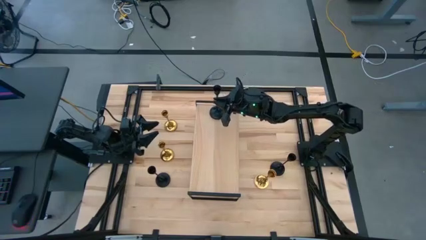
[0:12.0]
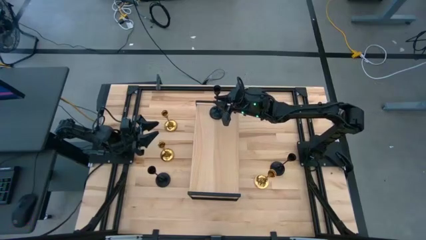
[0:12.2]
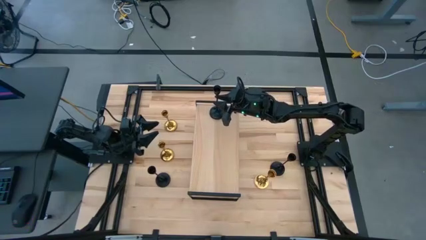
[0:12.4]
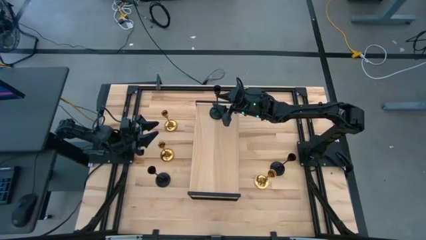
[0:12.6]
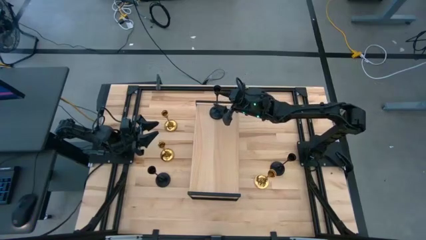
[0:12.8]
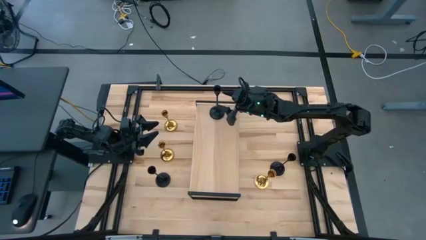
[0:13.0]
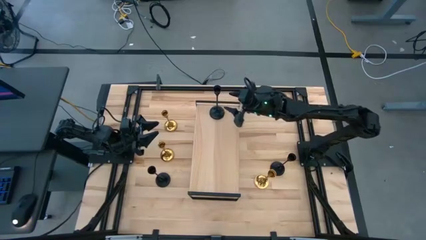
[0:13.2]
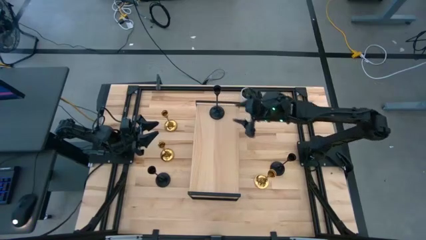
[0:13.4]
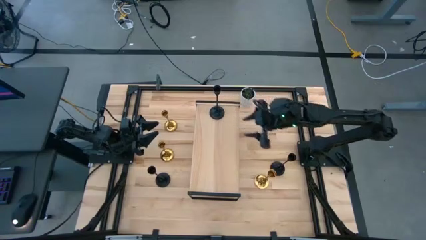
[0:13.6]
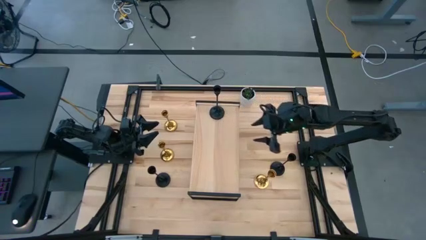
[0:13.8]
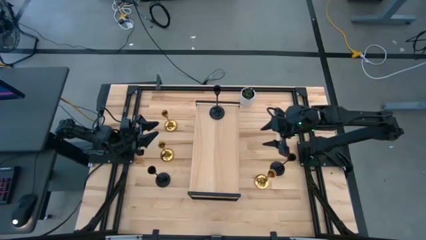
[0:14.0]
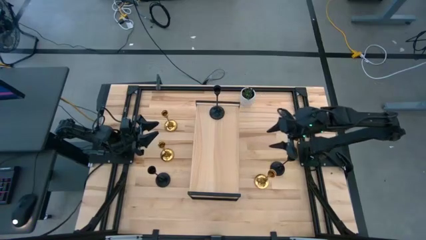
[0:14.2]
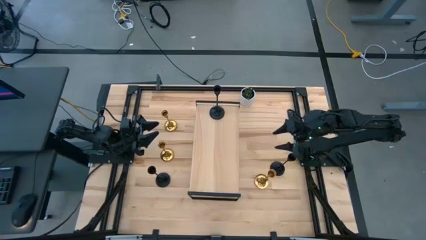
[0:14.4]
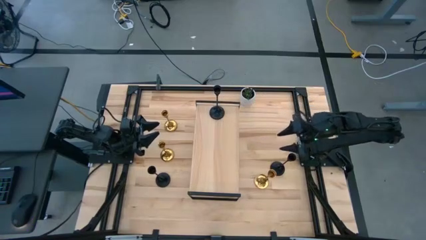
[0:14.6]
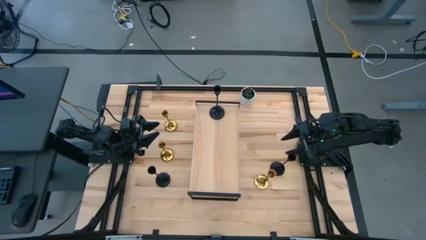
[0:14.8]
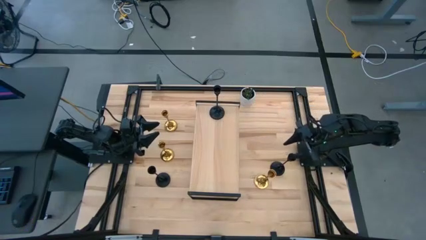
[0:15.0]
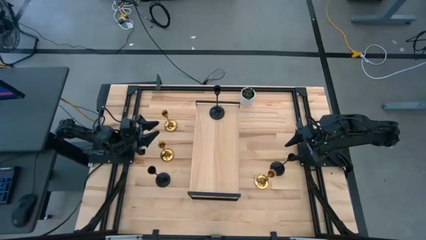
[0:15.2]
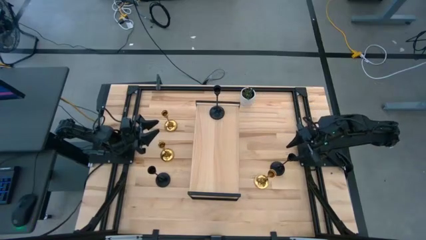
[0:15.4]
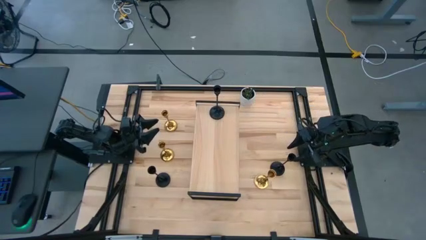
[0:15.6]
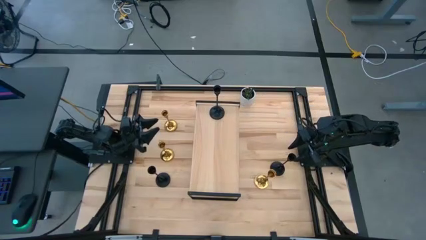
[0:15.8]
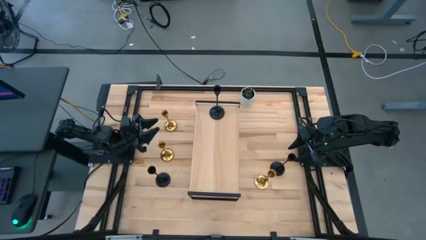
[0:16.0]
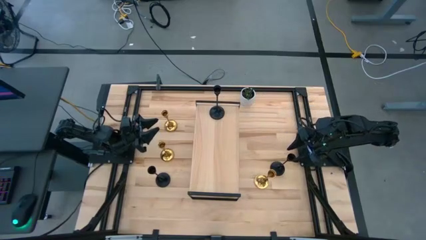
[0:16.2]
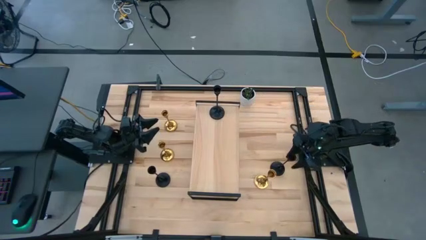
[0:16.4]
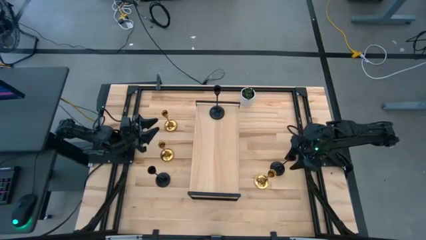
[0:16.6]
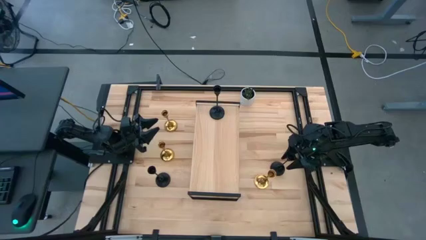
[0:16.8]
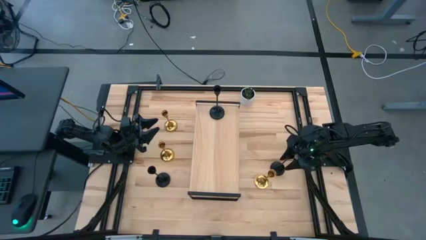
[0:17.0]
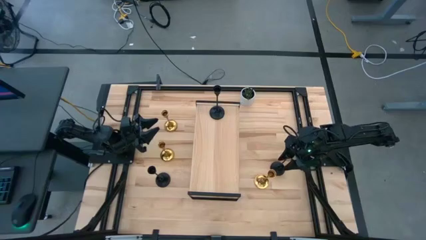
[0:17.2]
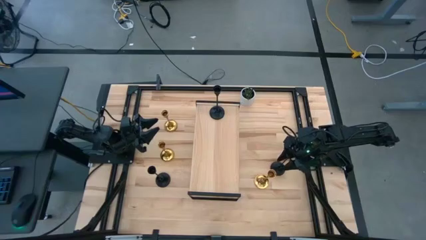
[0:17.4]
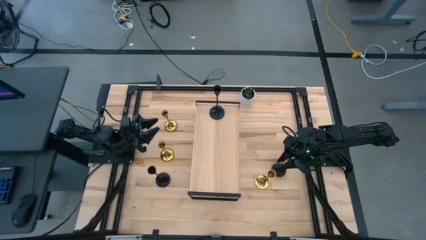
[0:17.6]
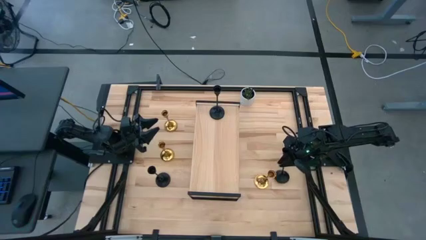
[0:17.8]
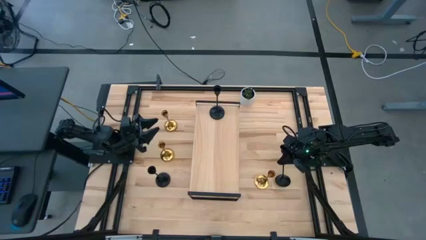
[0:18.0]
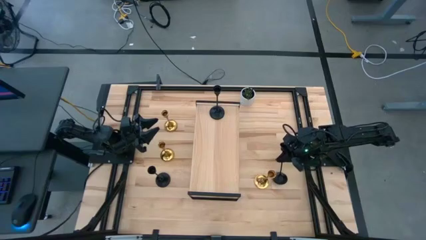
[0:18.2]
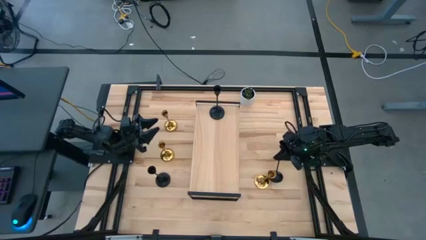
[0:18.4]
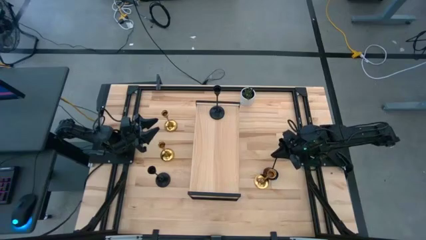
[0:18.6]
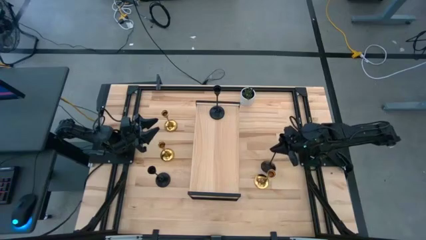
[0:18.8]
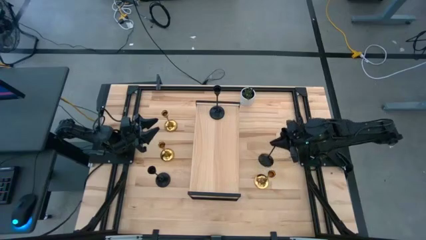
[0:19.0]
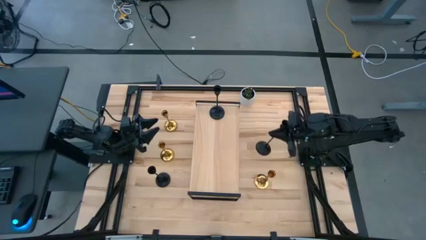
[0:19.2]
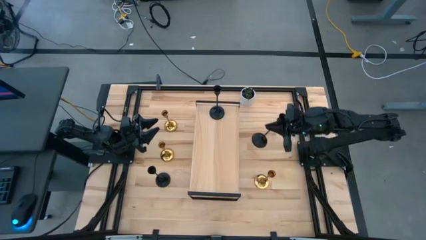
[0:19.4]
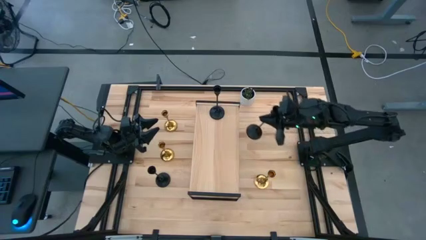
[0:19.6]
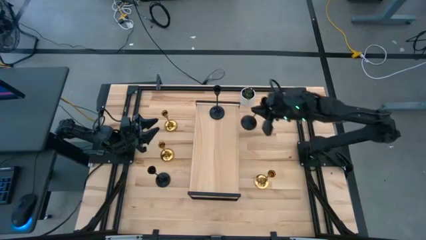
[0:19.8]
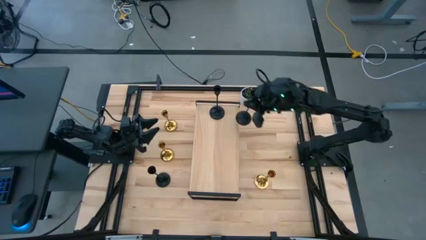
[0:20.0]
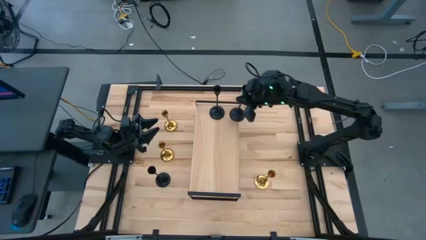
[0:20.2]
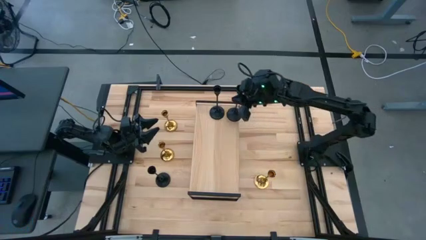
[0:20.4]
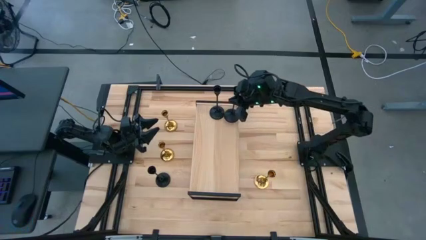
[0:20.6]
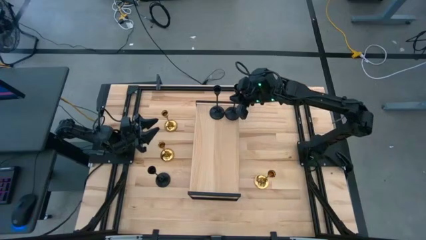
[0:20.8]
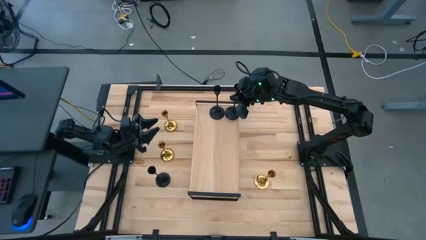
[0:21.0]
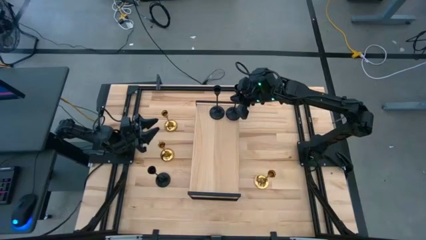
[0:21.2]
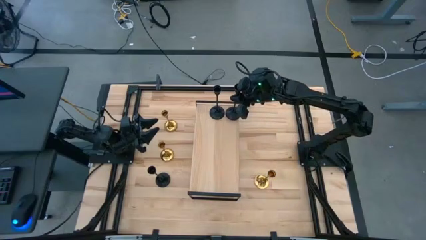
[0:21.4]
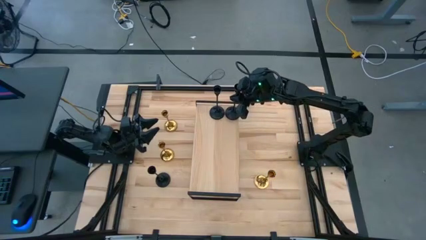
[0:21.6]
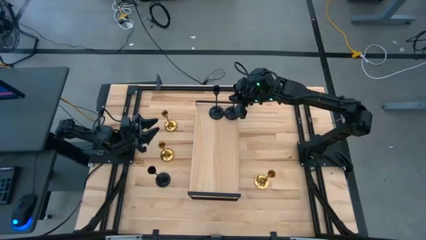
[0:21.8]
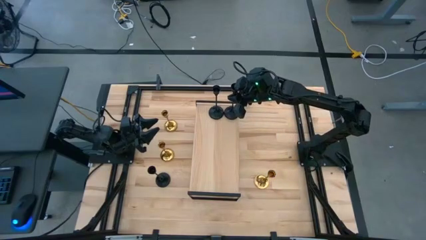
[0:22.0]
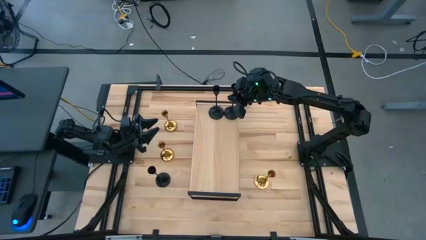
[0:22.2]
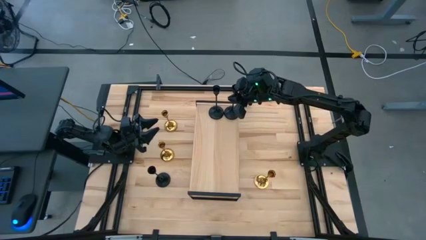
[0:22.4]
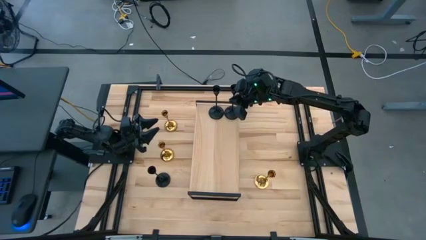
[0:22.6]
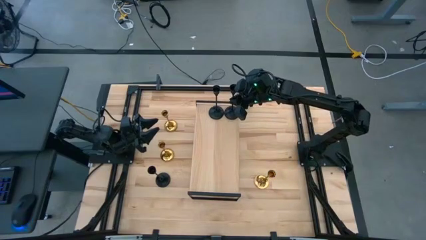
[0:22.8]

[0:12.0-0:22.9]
Task: Pick & Place candle stick holders
Align the middle right black candle holder with the black candle holder on the shelf

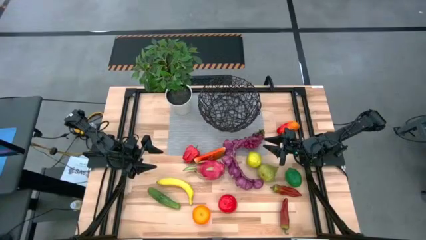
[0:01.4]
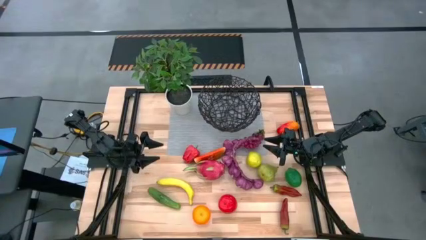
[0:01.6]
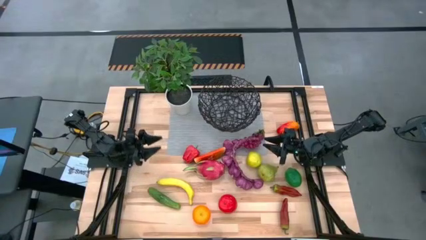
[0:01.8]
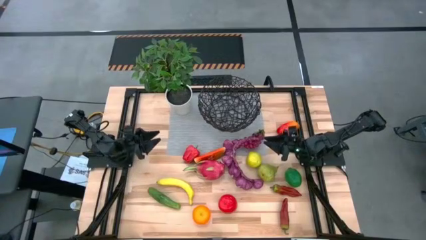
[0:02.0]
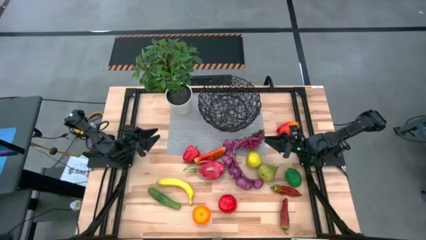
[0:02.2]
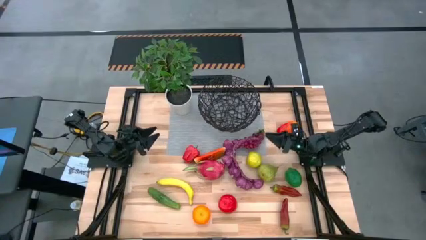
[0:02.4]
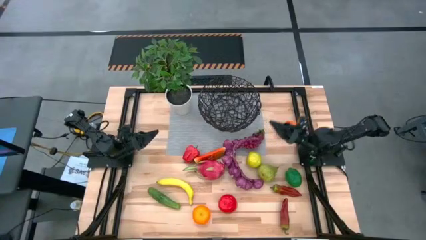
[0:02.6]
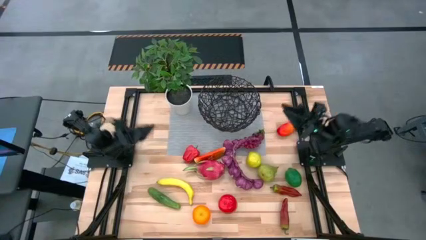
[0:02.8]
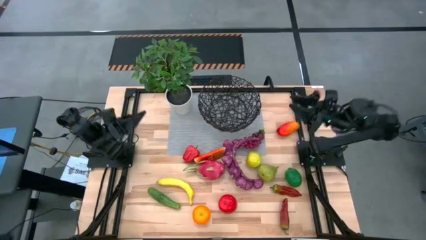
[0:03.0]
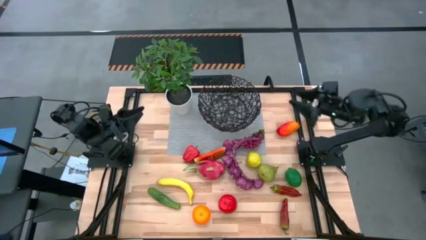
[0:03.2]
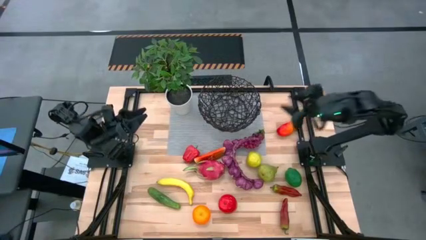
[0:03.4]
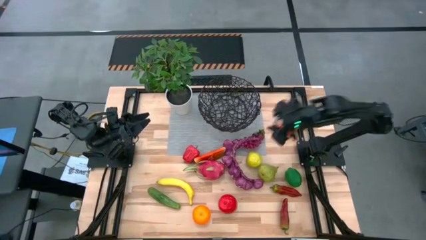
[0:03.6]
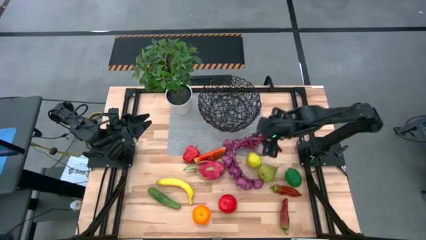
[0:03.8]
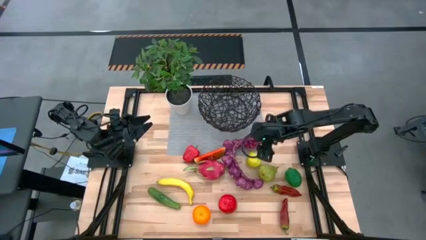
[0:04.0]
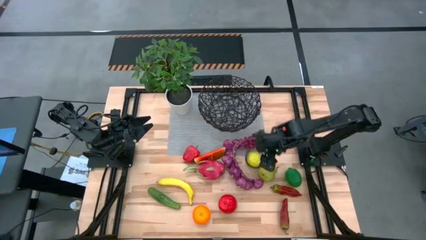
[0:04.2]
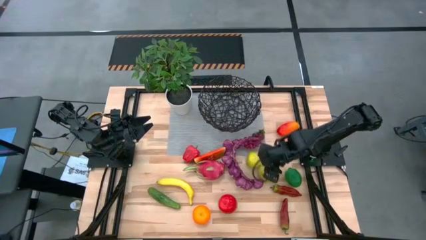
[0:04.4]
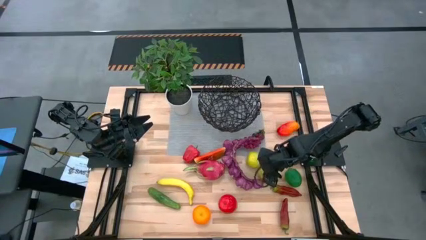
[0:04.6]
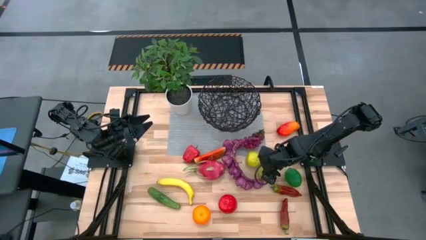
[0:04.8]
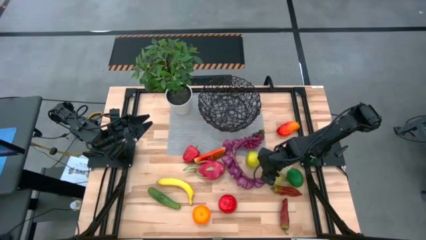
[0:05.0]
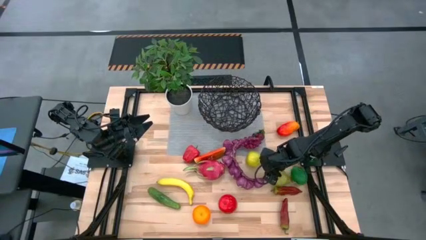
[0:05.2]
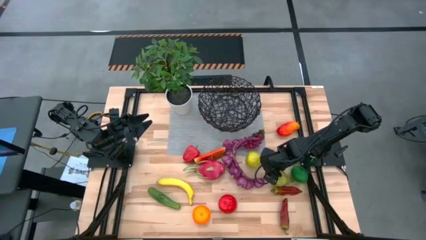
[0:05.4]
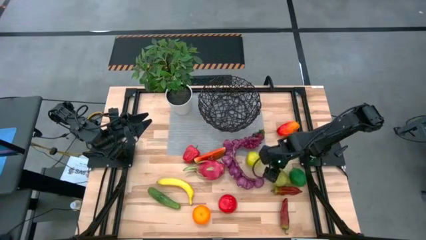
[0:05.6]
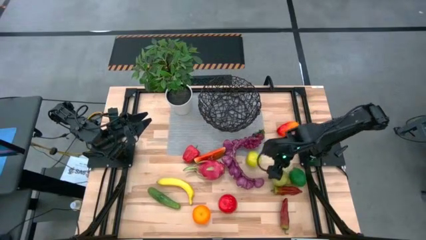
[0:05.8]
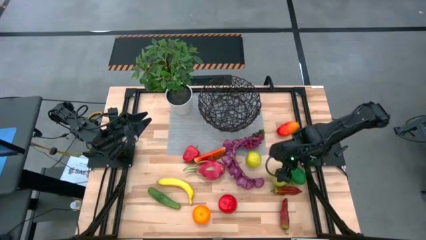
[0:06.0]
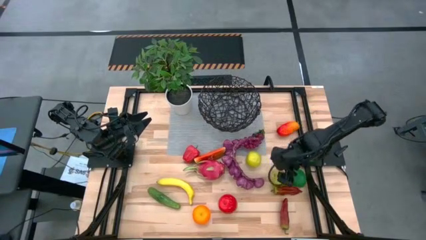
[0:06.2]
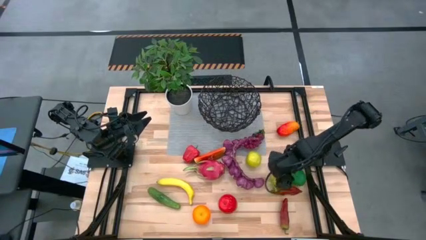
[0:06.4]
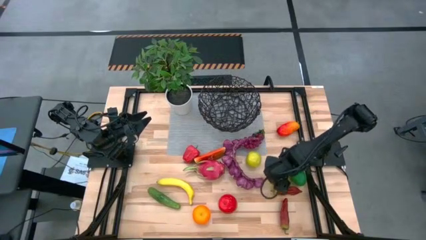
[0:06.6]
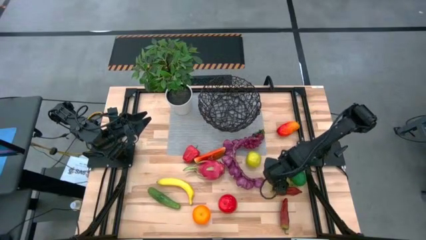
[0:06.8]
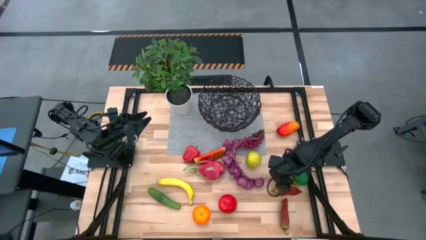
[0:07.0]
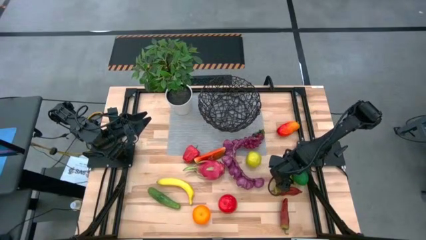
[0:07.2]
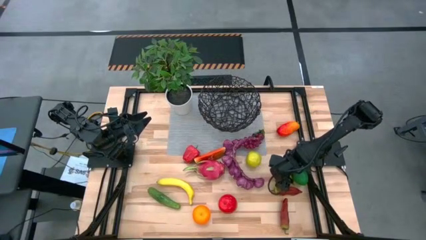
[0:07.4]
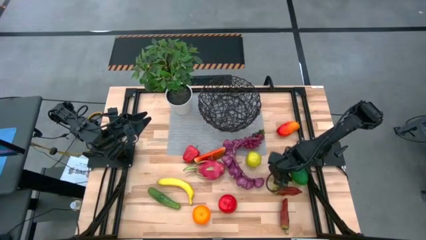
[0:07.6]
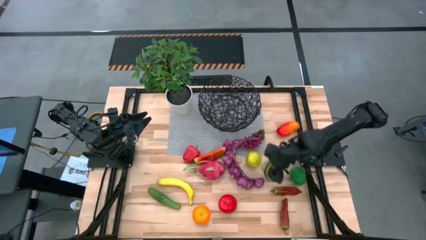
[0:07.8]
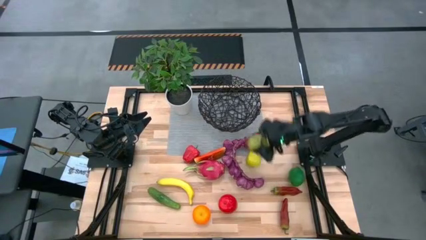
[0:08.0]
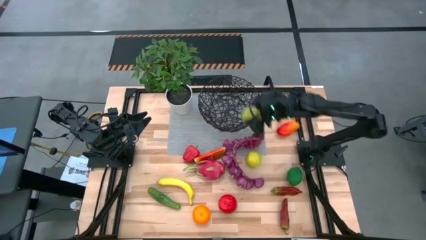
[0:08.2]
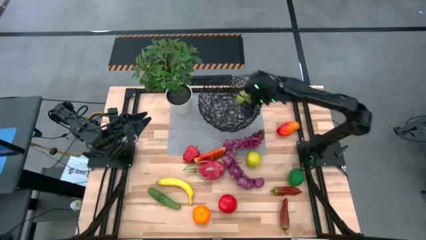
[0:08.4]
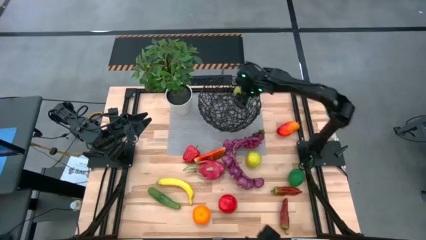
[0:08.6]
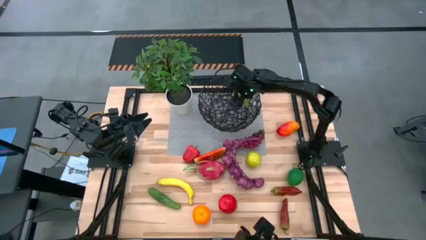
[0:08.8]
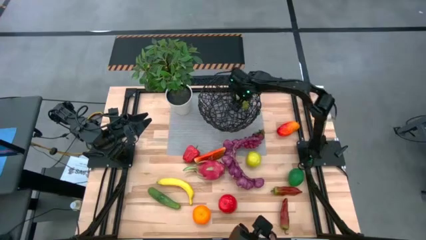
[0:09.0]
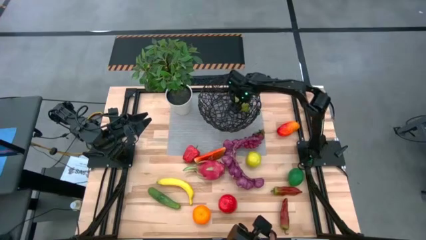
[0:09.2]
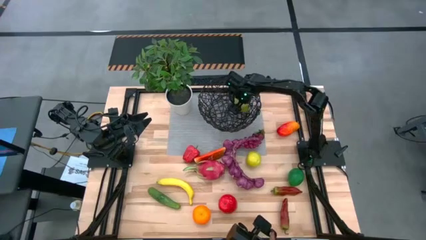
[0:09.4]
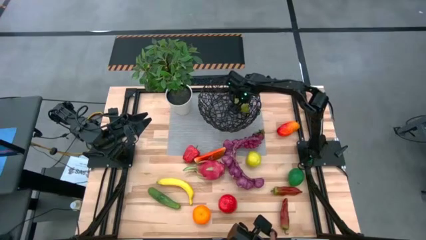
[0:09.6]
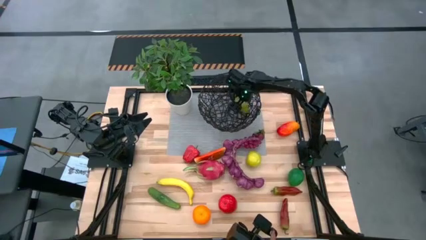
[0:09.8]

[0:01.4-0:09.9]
Task: Build produce basket
Put the green pear into the black wire basket
